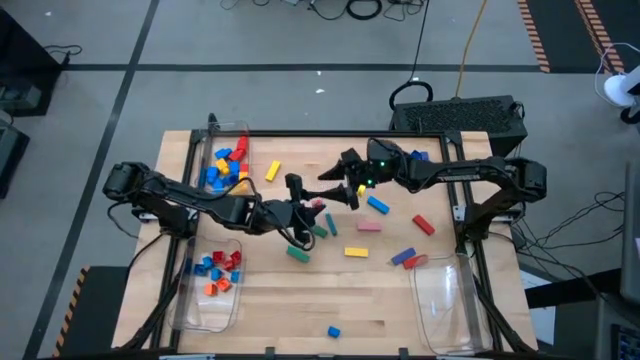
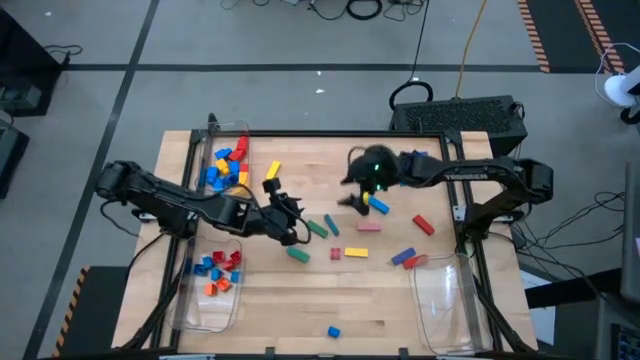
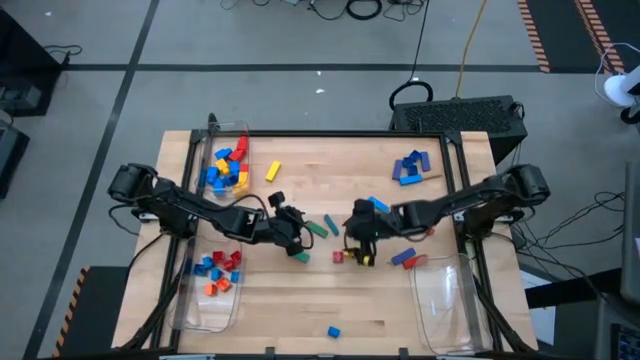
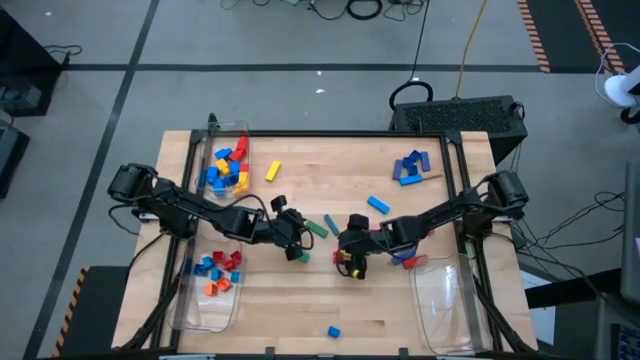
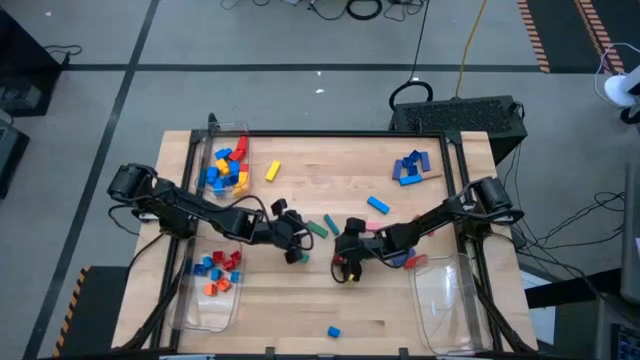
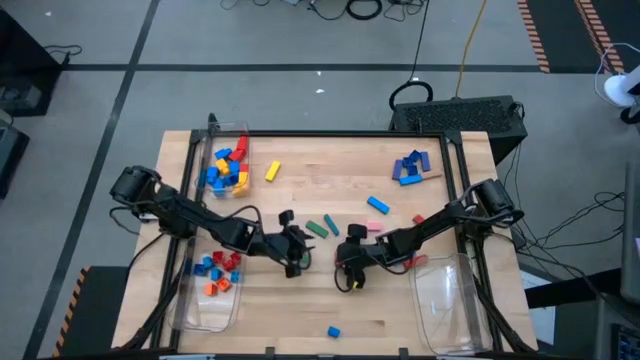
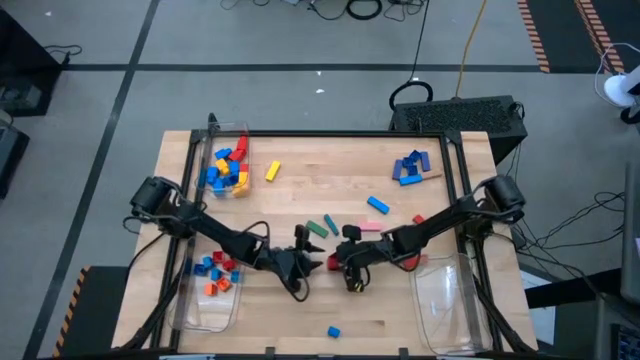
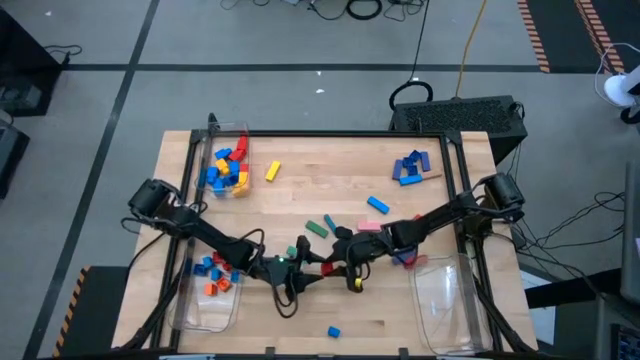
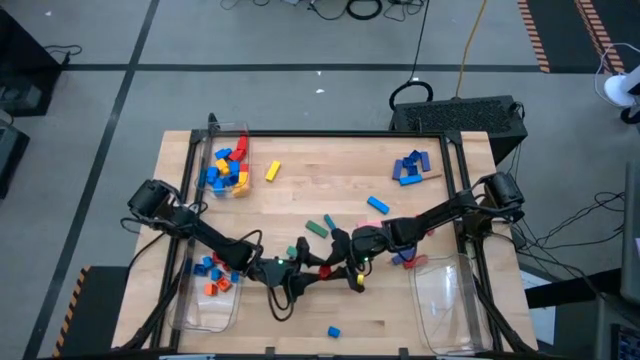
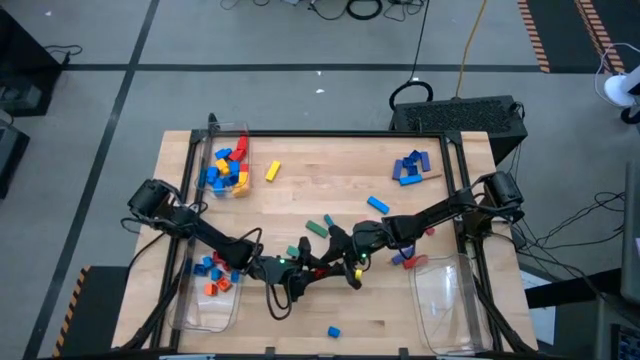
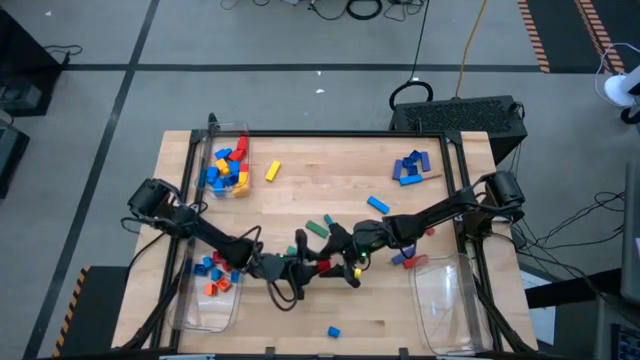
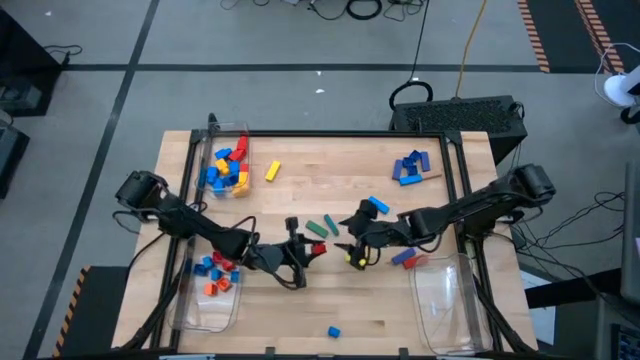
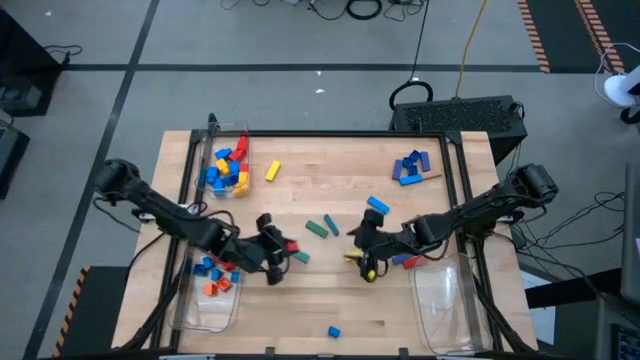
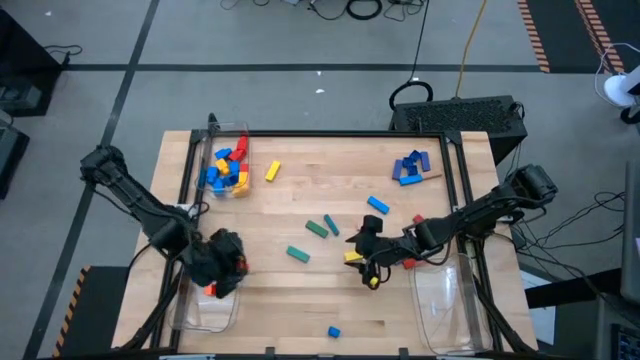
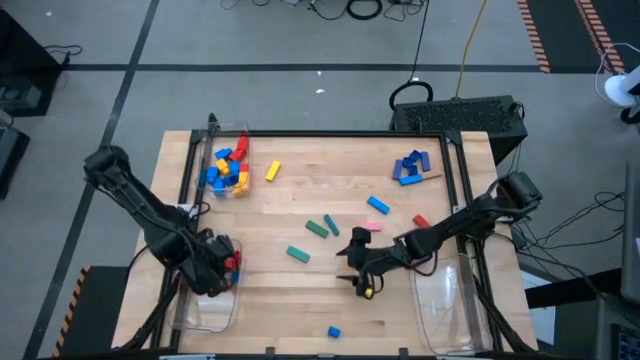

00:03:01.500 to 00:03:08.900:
Task: Sort blocks by size
Put the red four stud game piece into the bottom left transparent bin

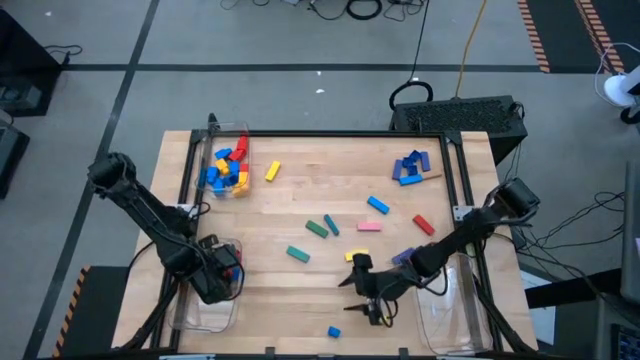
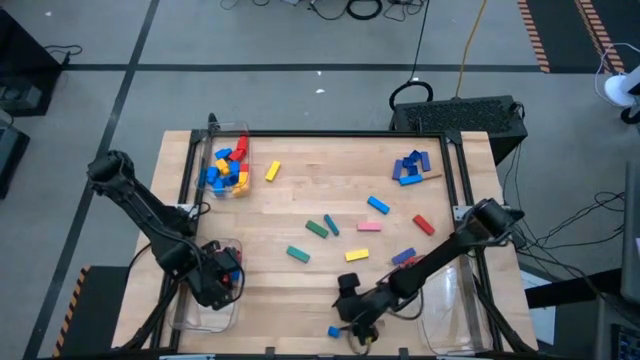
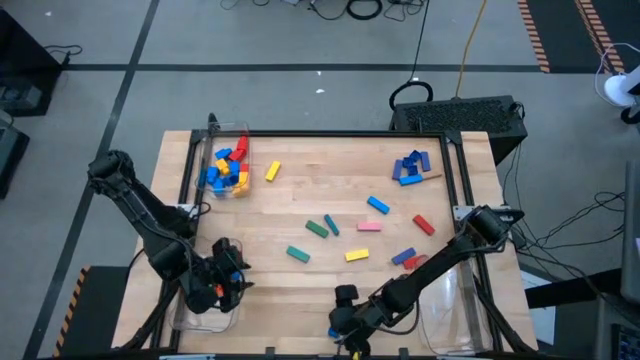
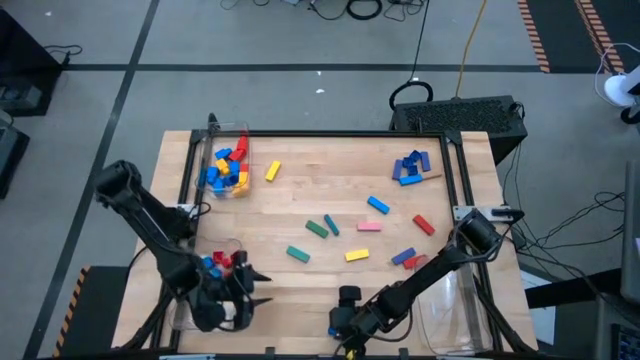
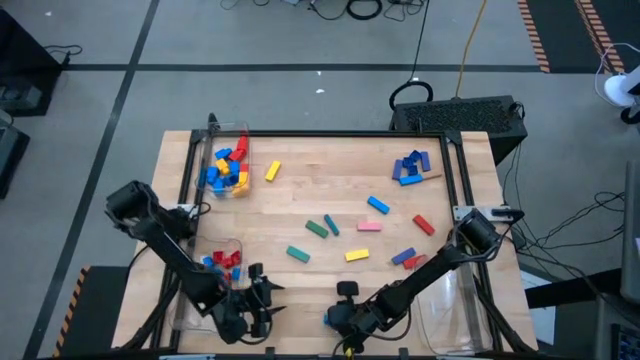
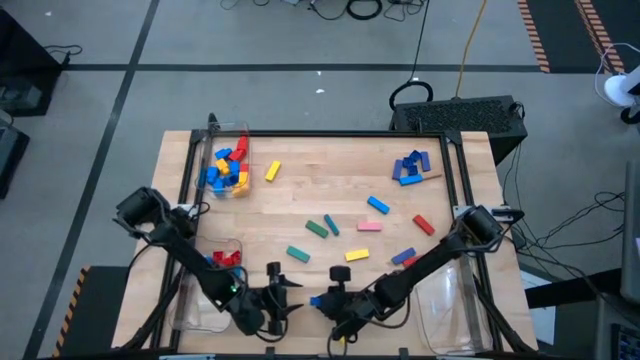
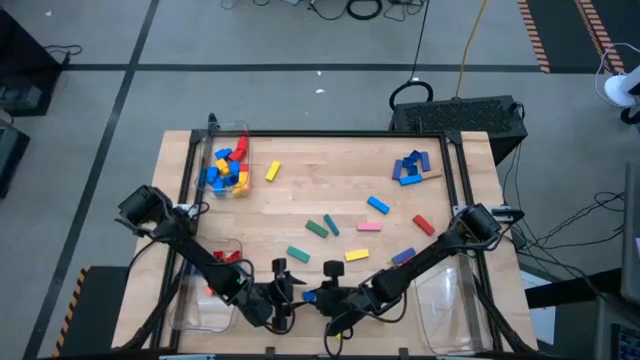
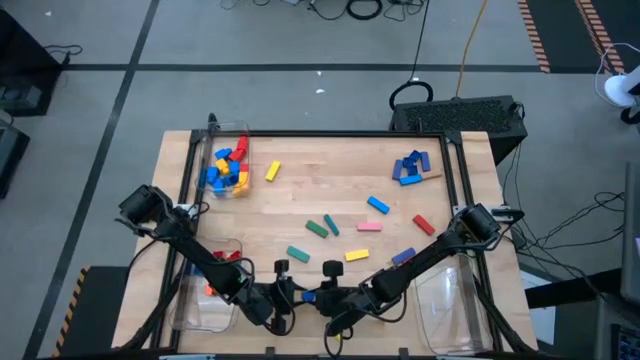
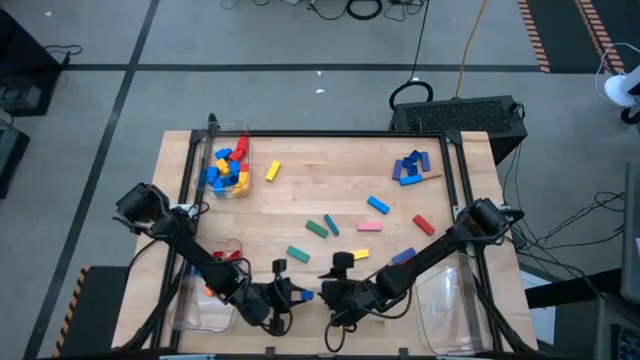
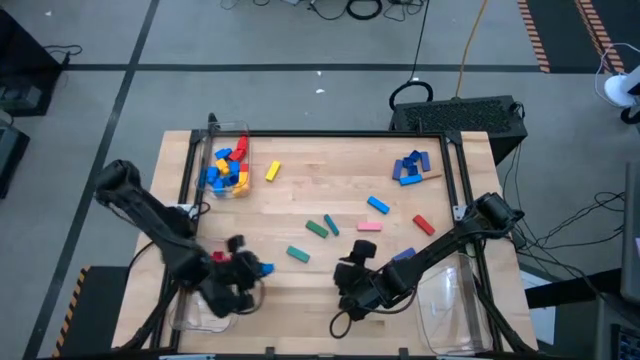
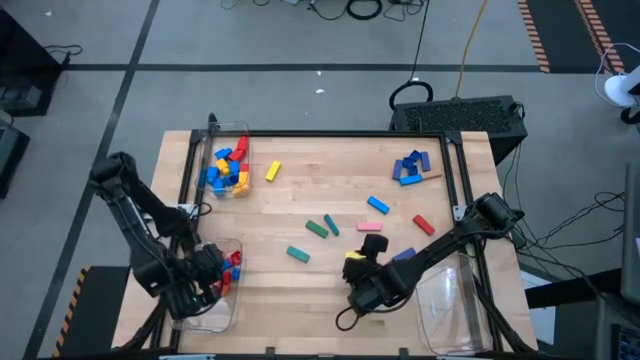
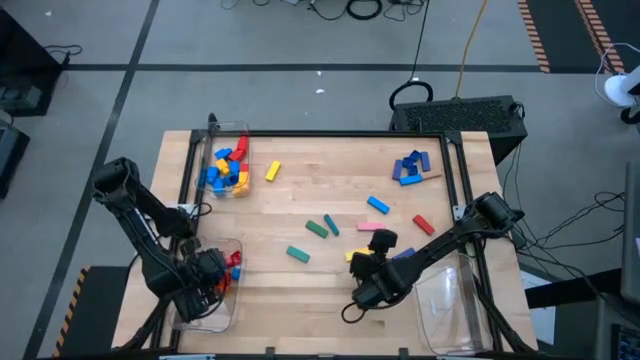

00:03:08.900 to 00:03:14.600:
Put the blue four stud game piece into the bottom left transparent bin

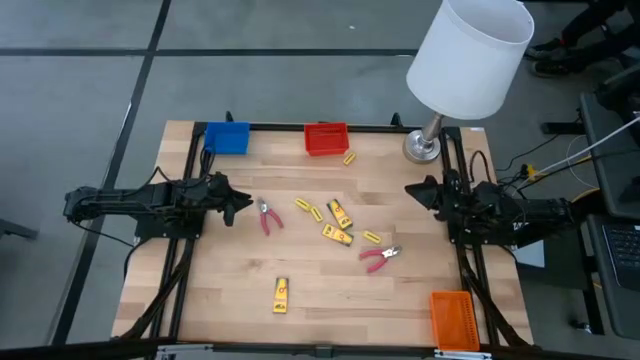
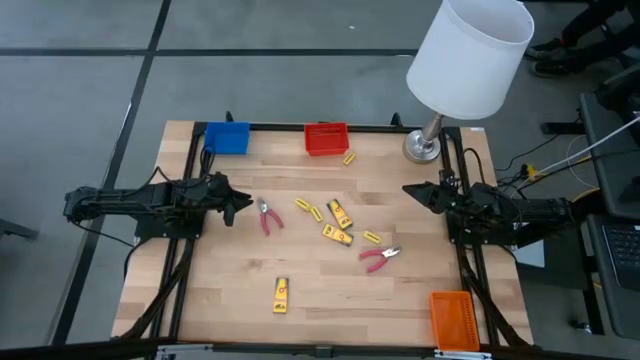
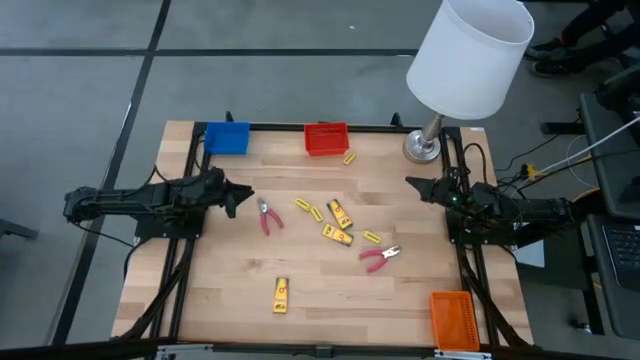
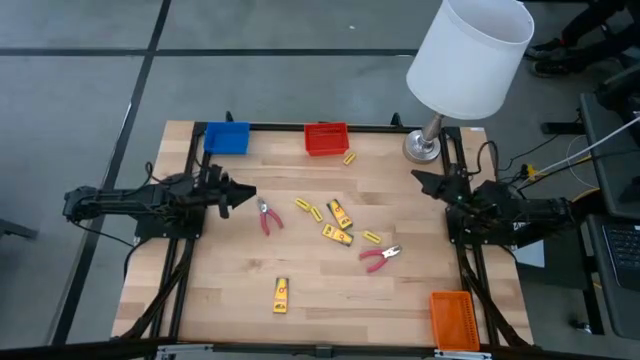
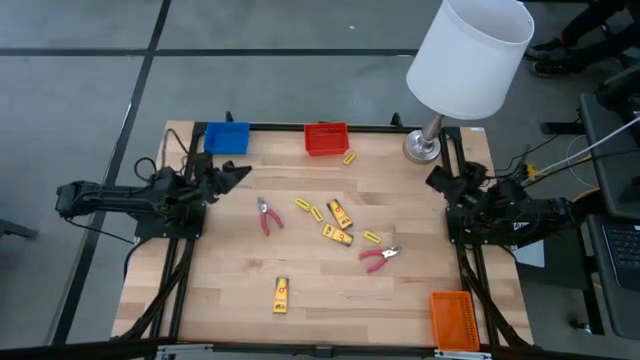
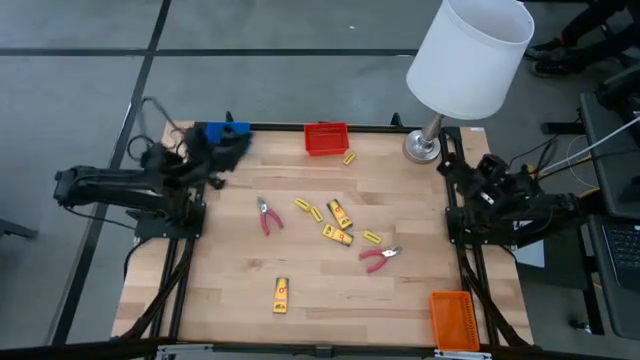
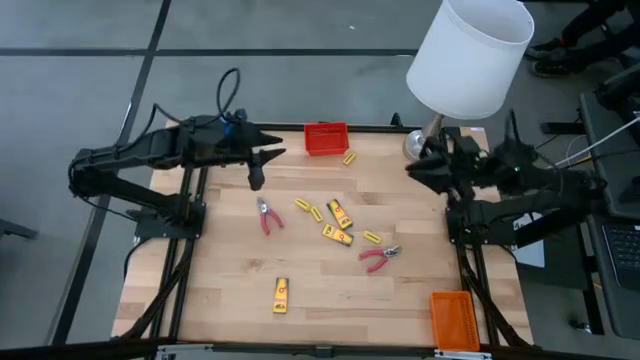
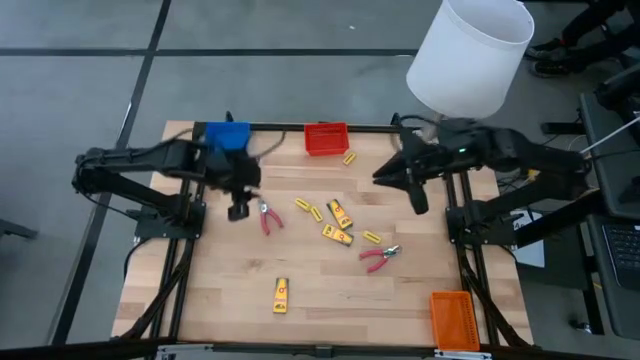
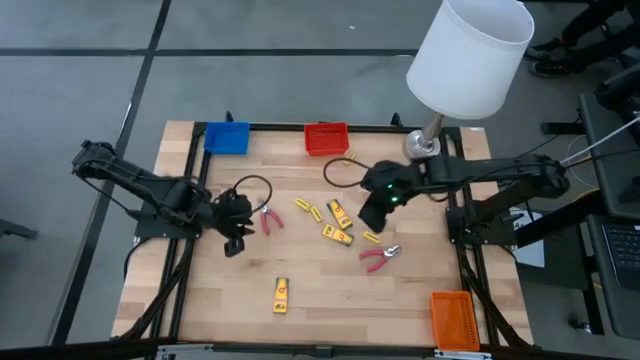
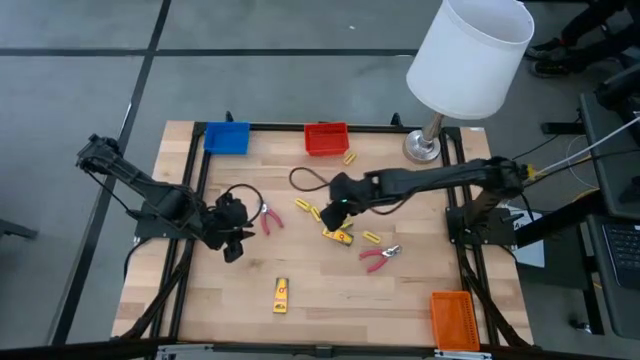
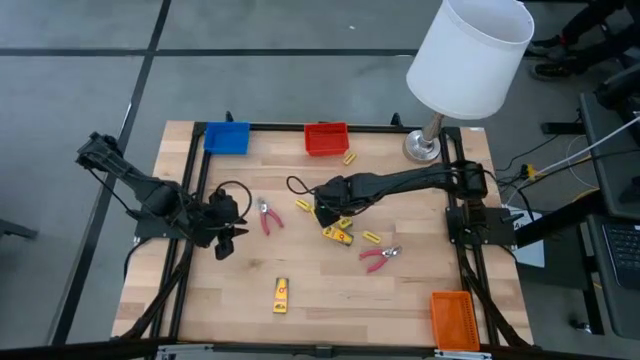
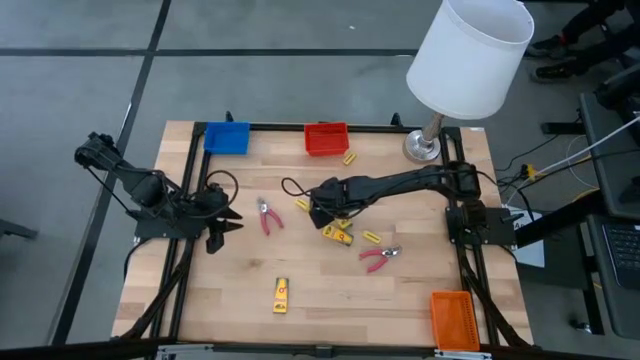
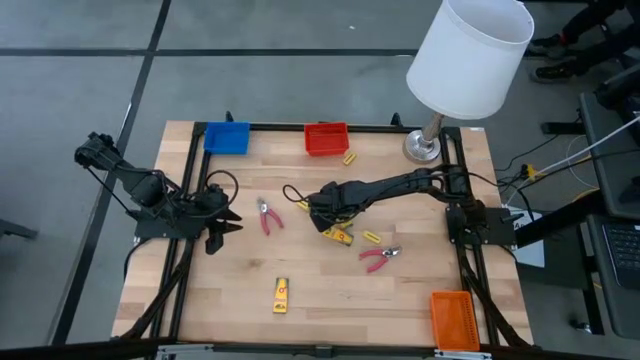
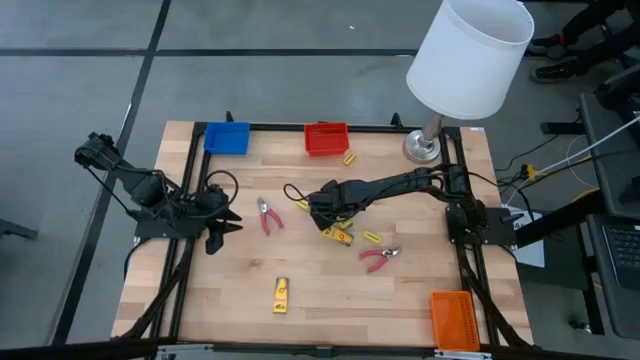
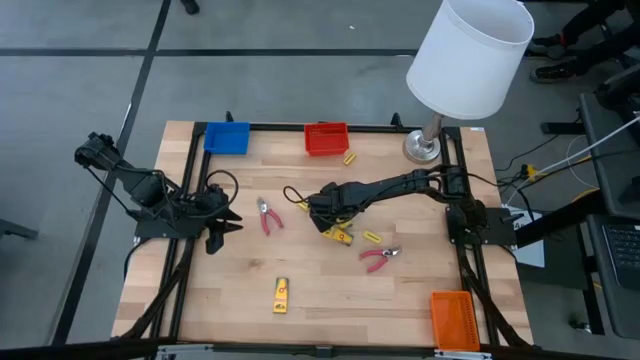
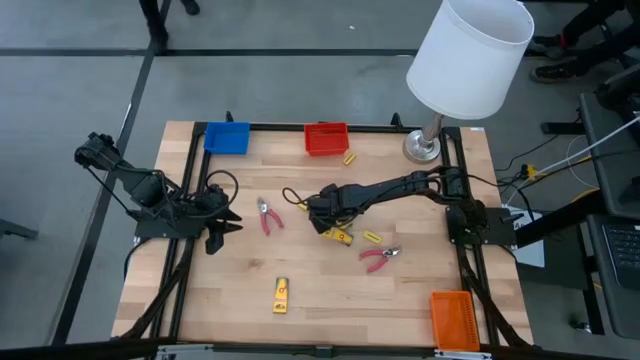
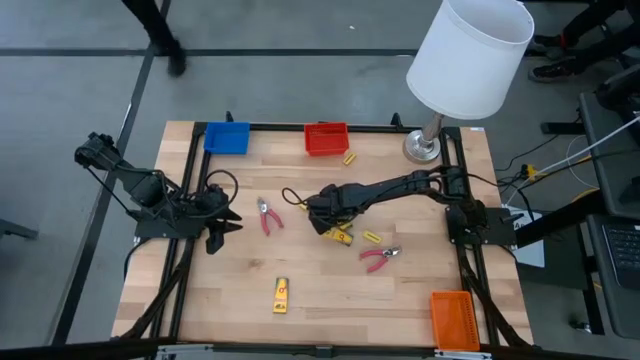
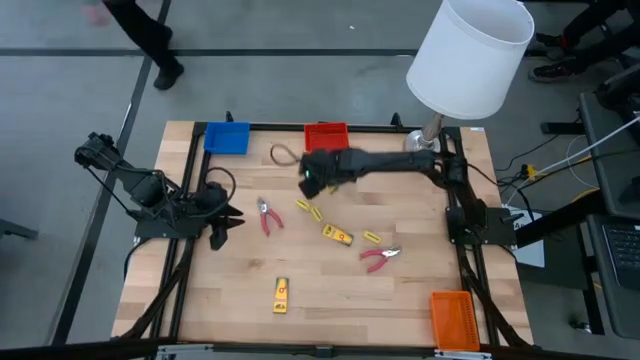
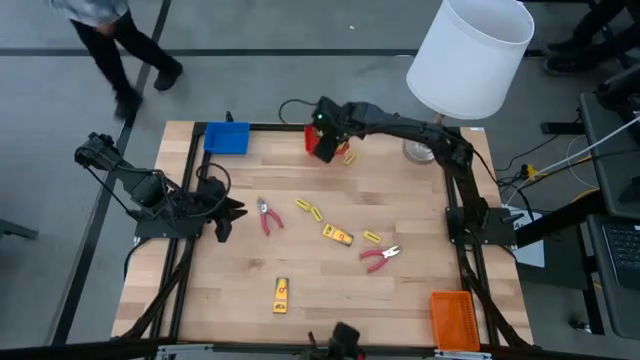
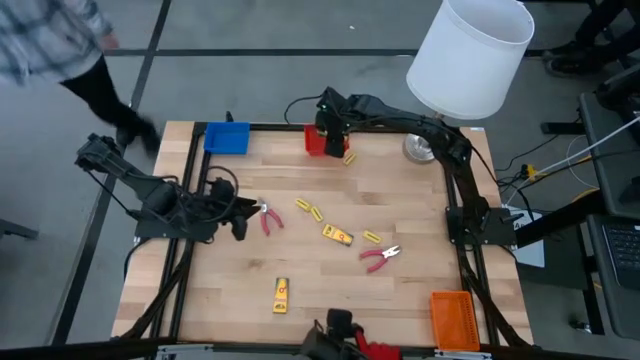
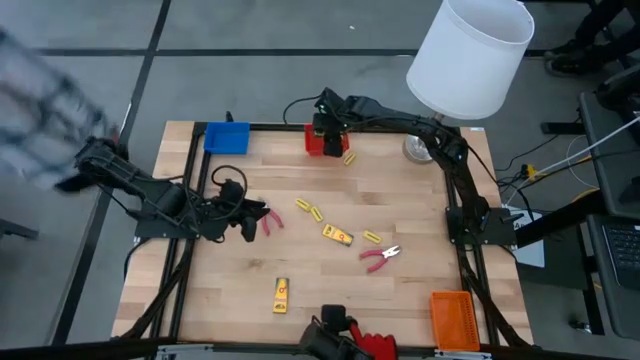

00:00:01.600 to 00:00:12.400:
Task: Pick & Place School Supplies
Put the yellow crayon box into the red bin
